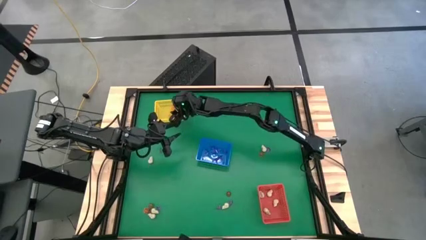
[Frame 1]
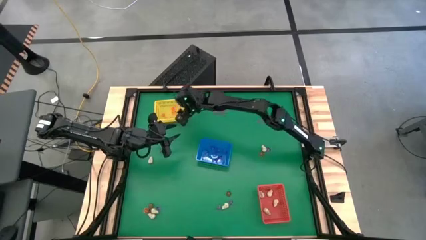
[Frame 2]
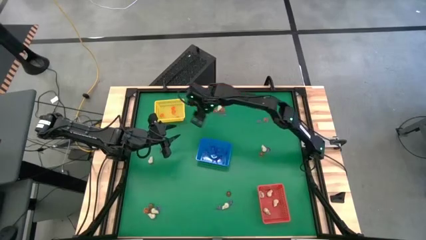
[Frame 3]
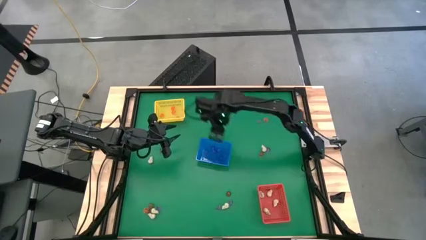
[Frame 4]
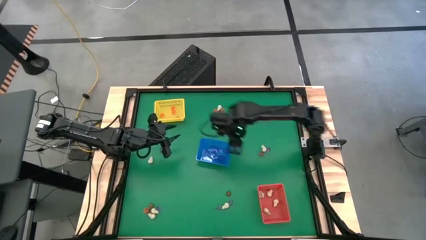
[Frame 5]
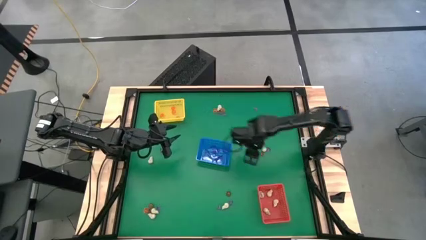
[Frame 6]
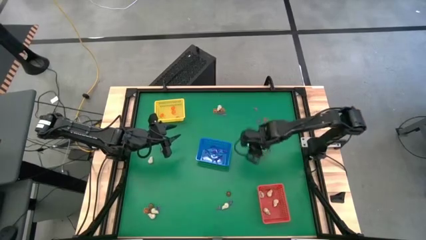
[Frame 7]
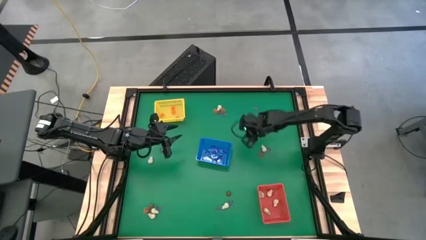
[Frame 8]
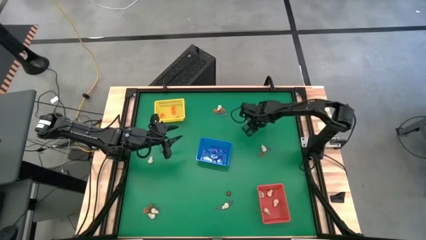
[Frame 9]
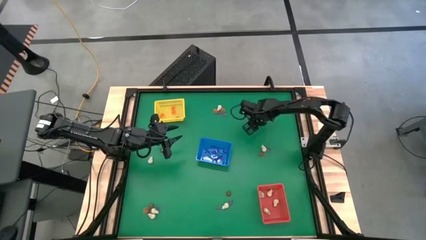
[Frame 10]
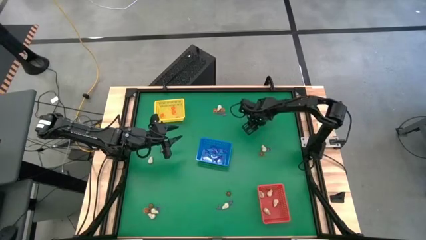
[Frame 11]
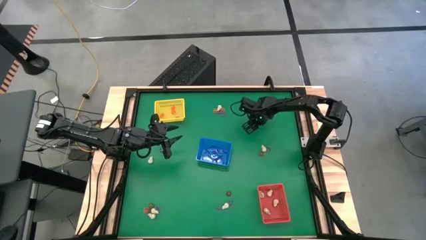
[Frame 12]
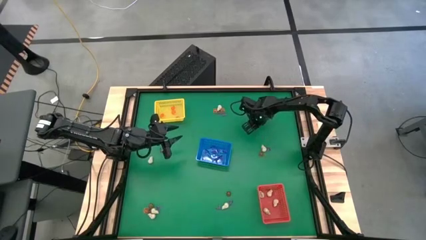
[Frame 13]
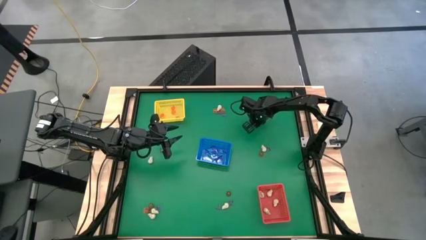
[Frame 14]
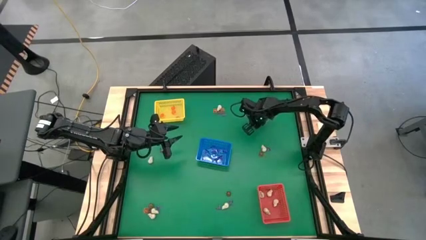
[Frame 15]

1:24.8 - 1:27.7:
Task: Sort Halloween decoration
Put the witch hat toy into the blue basket

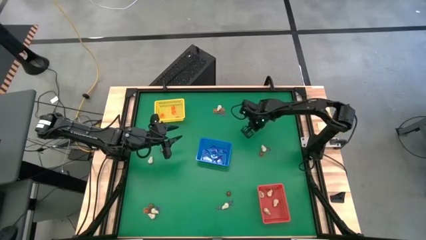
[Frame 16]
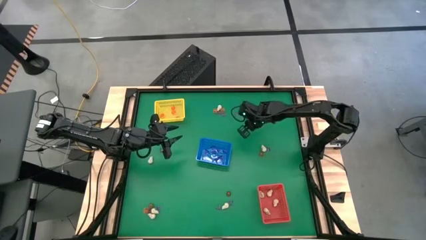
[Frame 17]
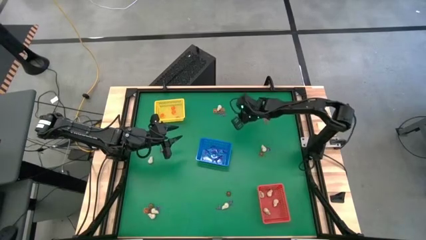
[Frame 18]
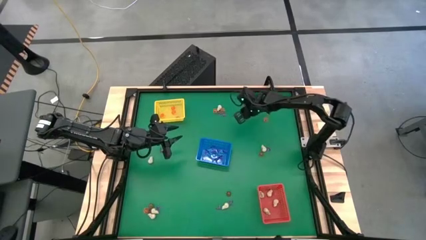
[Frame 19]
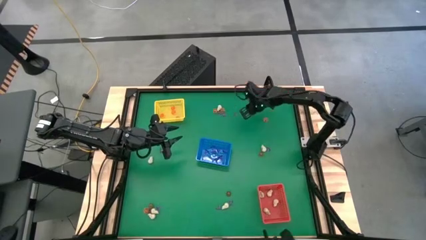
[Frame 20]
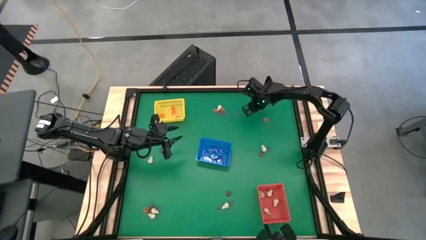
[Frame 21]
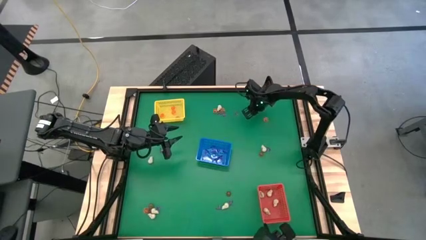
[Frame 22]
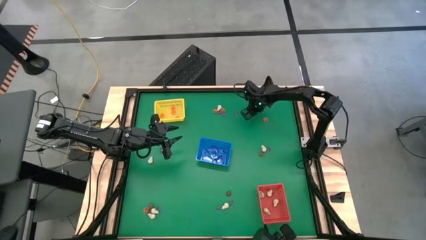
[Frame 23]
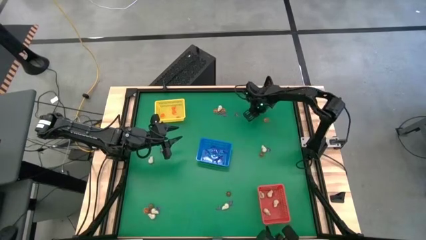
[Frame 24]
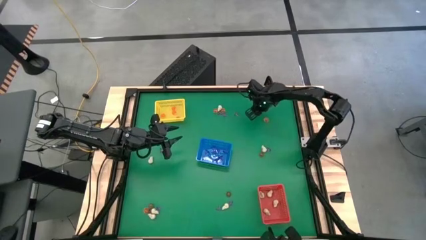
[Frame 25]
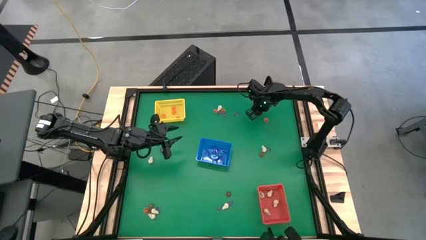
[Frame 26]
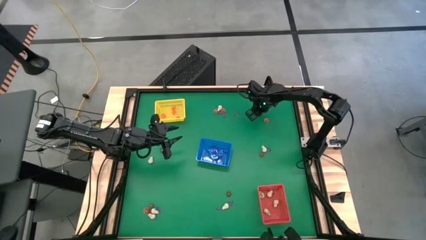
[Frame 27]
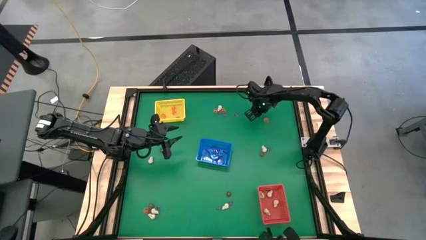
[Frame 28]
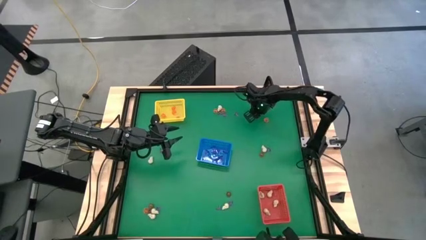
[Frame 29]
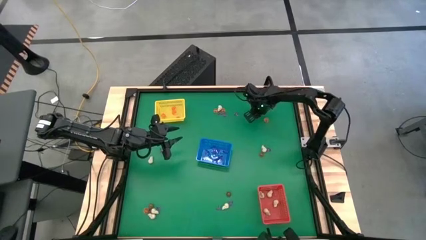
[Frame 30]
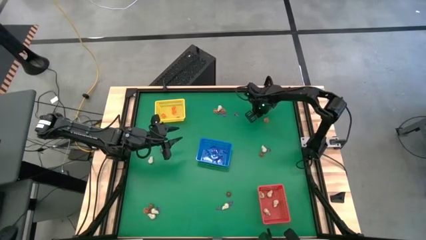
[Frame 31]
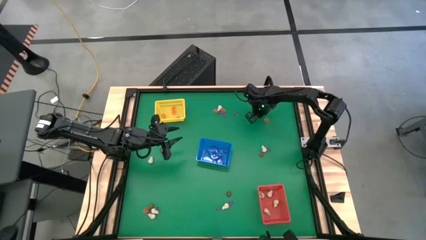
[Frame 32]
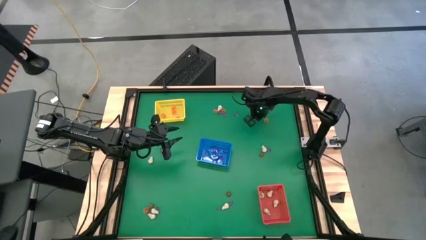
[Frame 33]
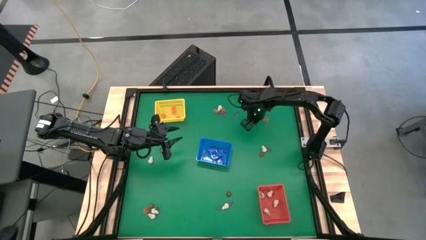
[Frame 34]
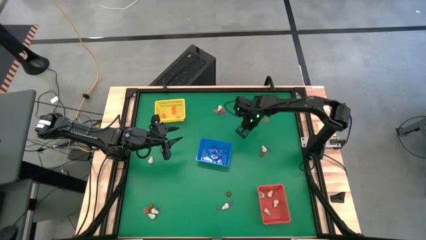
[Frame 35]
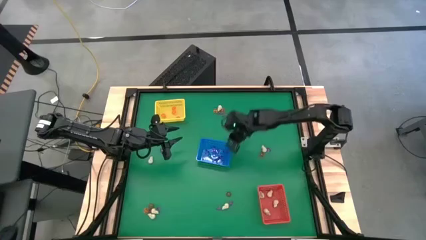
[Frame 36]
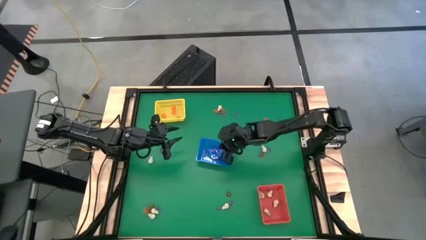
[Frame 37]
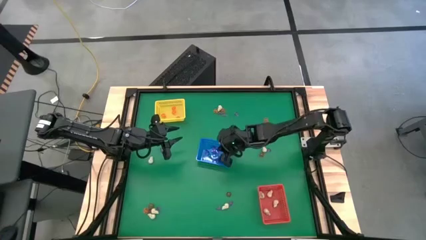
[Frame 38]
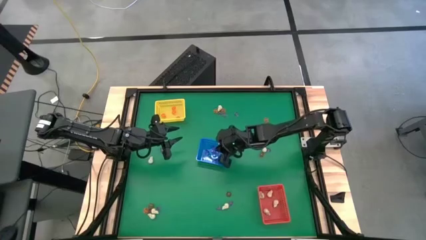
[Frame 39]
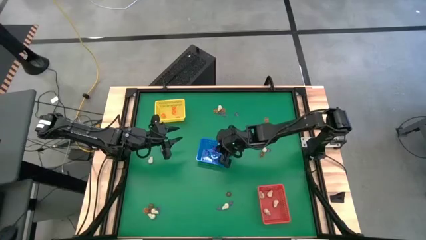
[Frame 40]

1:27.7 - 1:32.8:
Put the witch hat toy into the blue bin

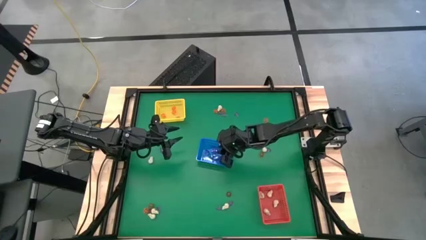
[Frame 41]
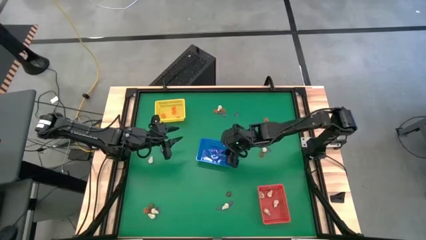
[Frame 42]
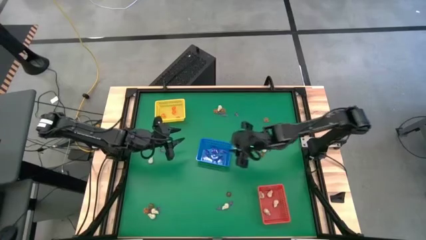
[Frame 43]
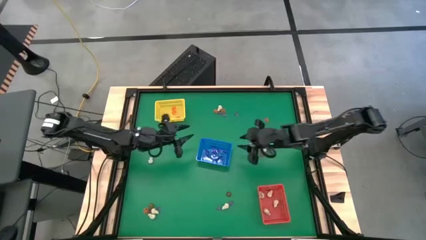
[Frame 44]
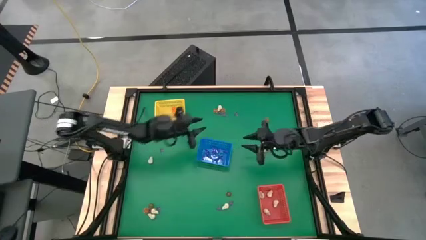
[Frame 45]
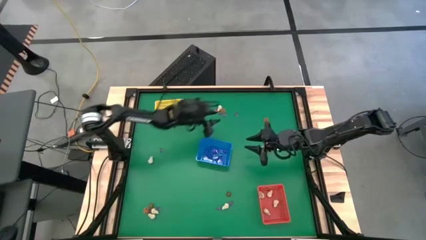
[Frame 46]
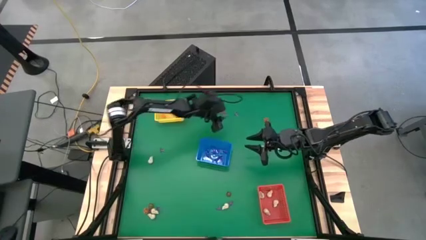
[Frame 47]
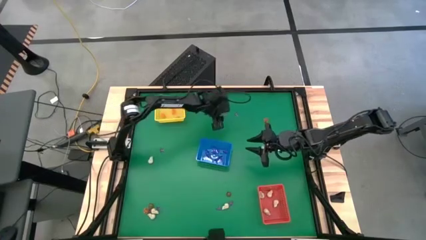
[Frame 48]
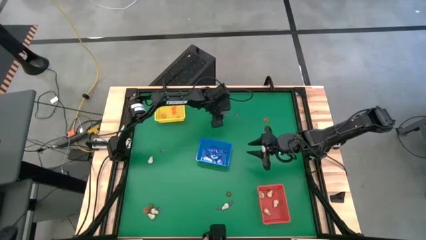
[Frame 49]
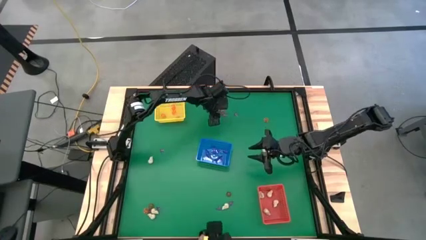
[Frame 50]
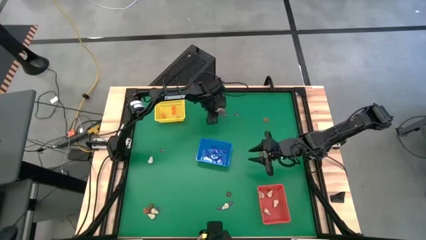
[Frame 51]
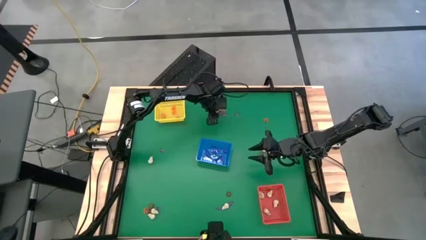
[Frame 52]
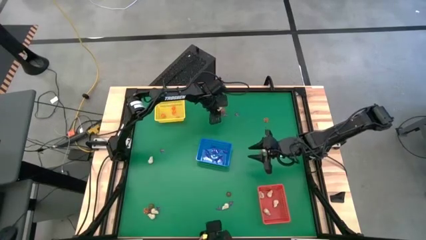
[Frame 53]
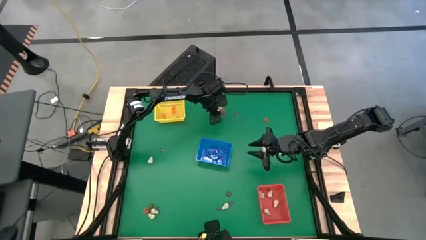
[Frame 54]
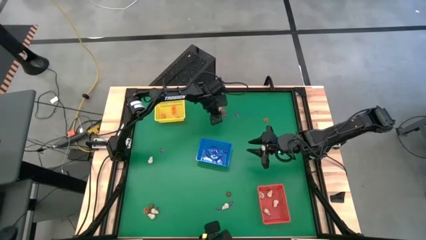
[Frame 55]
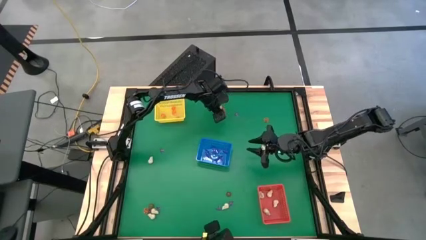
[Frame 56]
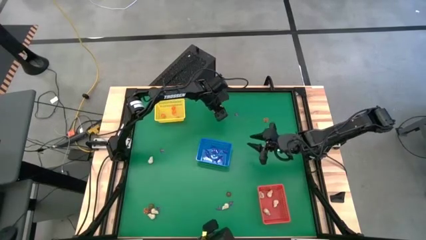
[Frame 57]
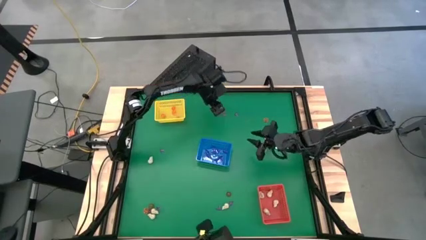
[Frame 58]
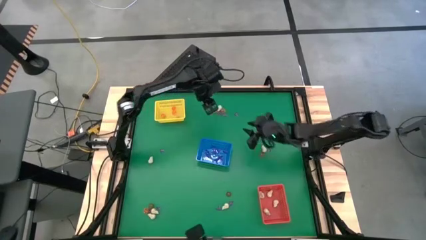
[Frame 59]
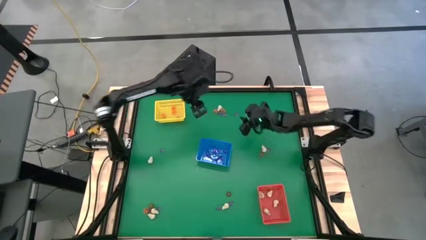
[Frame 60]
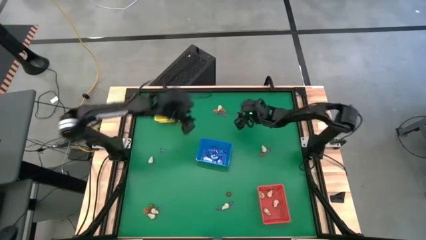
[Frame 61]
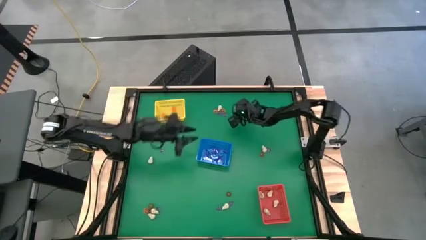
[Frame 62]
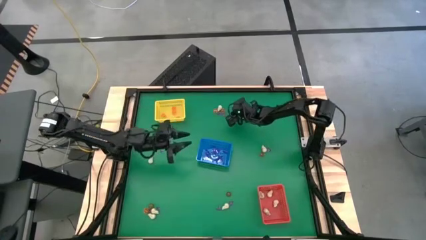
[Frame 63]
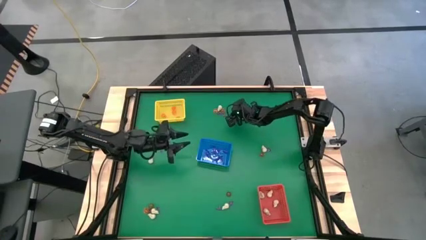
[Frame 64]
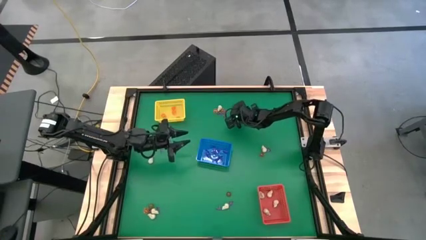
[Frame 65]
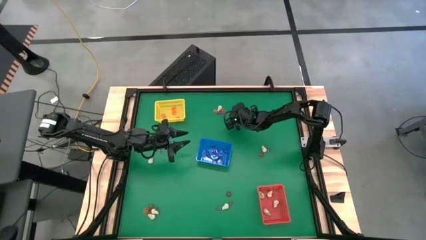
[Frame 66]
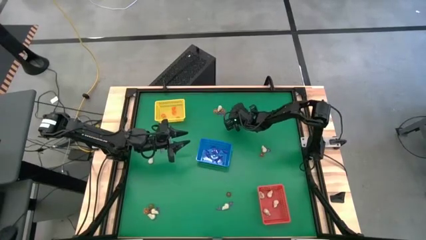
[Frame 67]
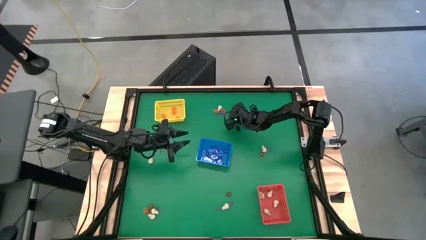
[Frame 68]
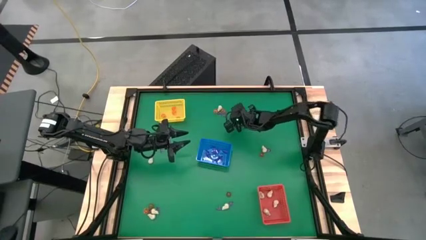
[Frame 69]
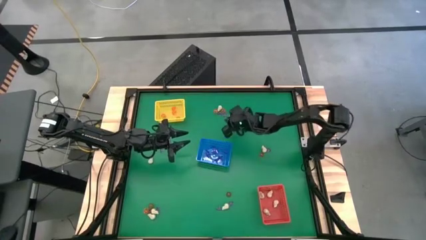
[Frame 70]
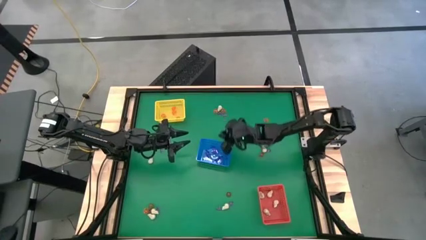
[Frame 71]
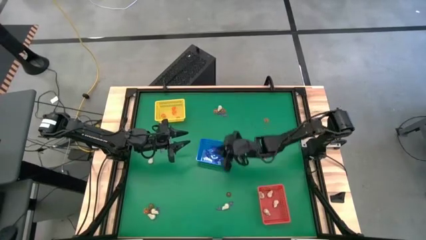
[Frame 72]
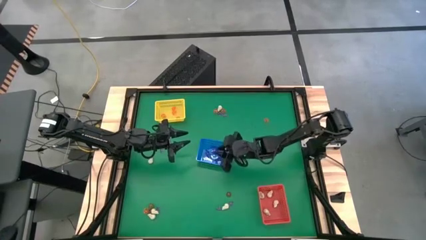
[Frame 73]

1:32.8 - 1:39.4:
Put the witch hat toy into the blue bin

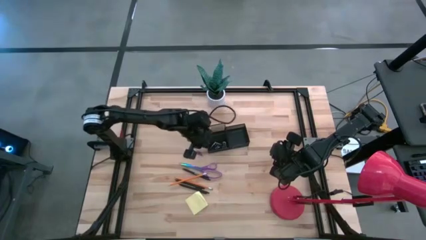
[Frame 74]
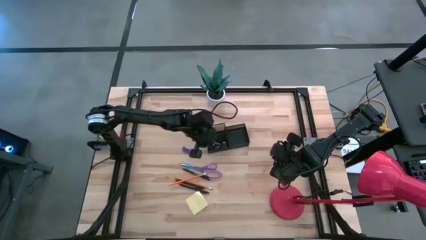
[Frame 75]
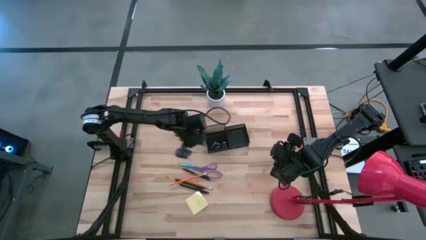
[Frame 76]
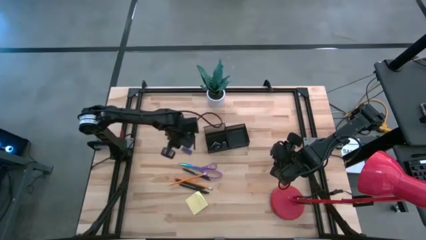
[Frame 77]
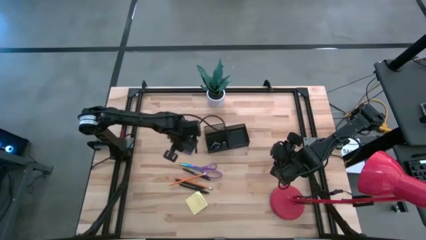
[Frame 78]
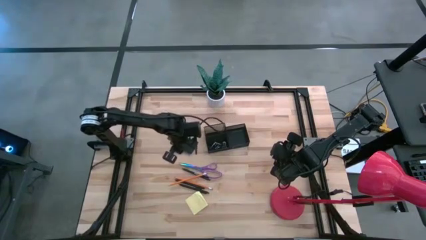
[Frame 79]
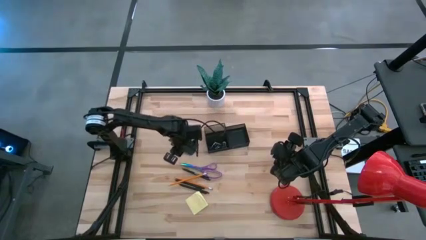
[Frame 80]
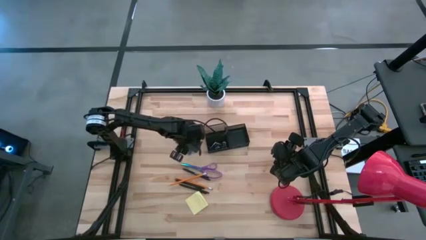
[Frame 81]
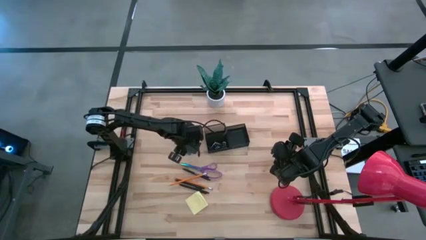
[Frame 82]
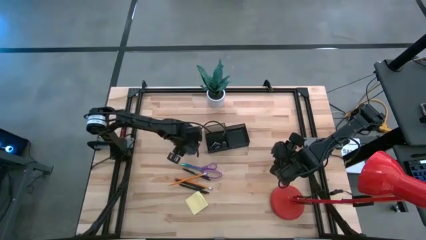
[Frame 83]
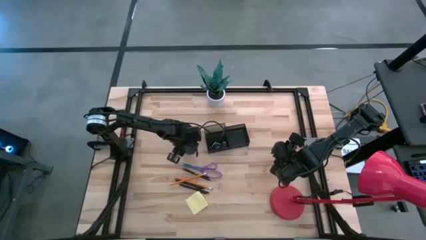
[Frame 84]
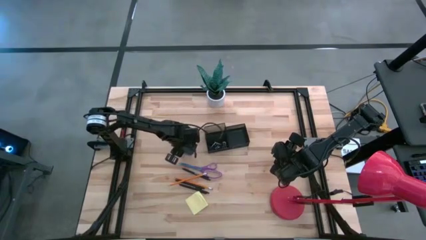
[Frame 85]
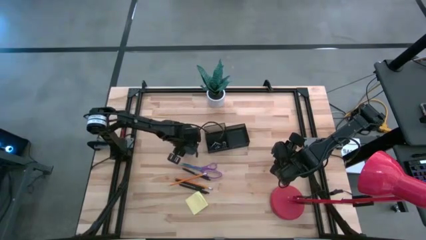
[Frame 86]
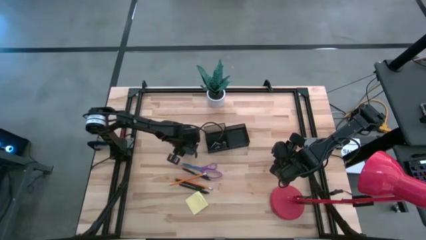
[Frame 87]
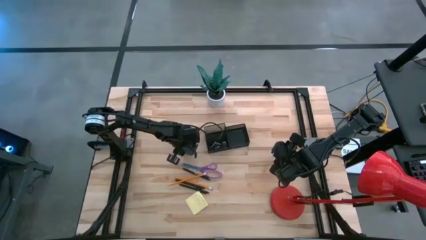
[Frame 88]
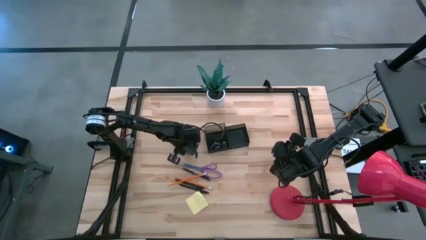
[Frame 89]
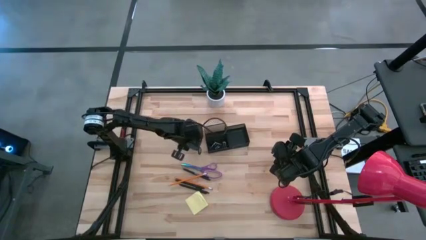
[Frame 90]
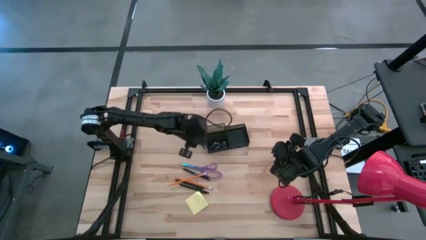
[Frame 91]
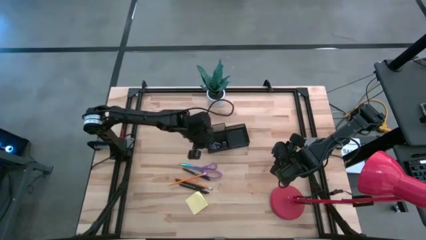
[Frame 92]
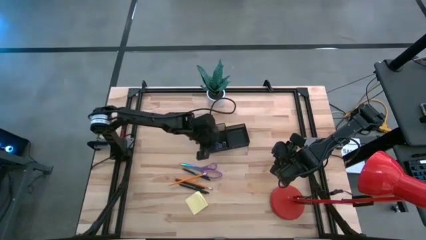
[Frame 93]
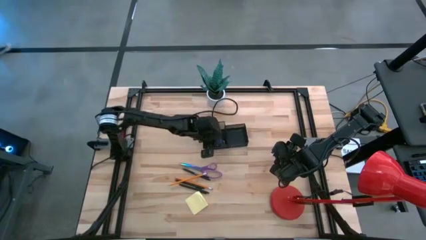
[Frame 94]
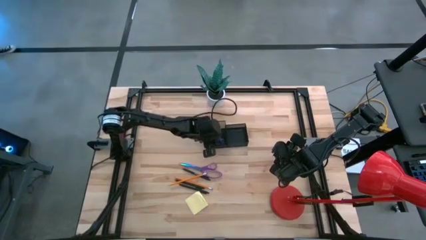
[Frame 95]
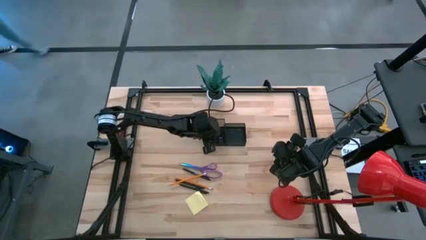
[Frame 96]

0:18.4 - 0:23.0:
Task: Pick and place office supplies into organizer
Put the blue eraser into the black organizer
